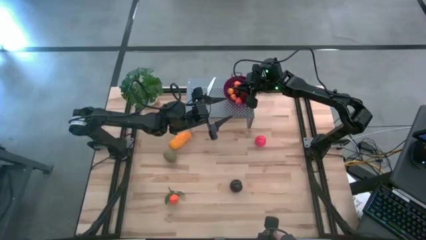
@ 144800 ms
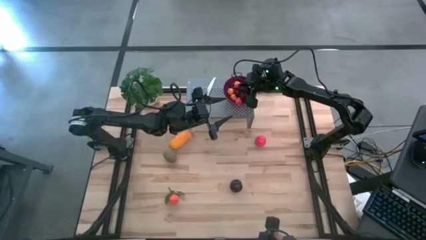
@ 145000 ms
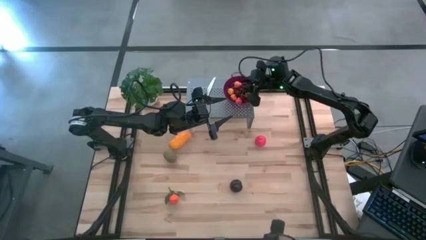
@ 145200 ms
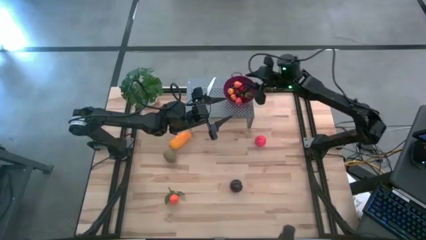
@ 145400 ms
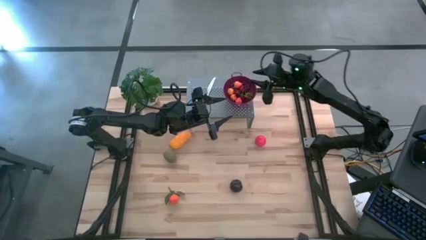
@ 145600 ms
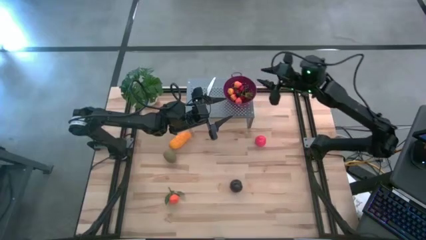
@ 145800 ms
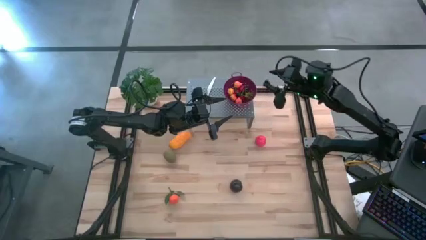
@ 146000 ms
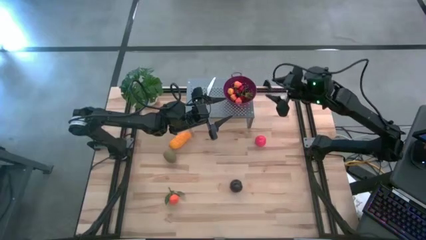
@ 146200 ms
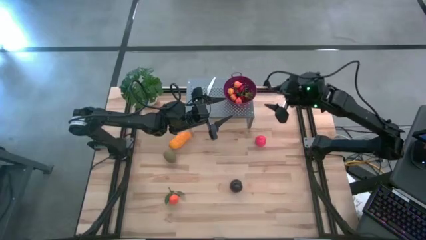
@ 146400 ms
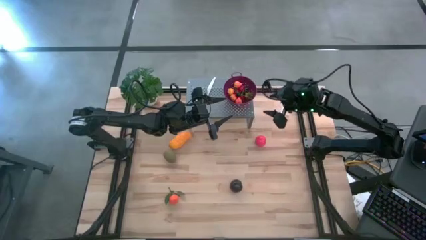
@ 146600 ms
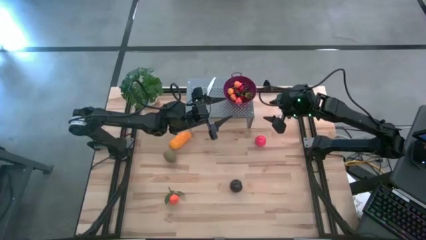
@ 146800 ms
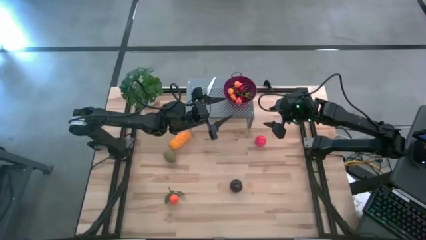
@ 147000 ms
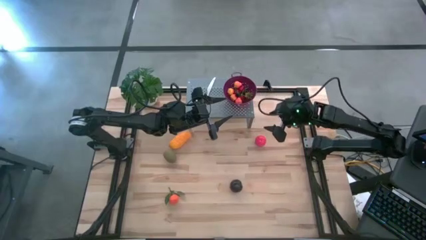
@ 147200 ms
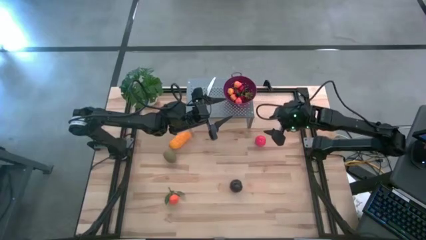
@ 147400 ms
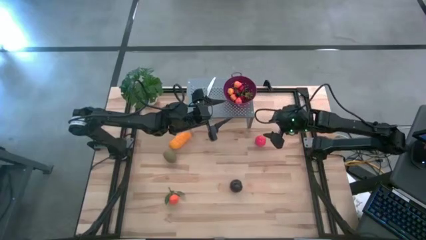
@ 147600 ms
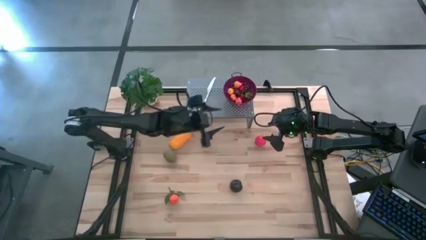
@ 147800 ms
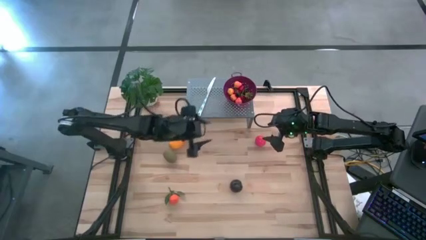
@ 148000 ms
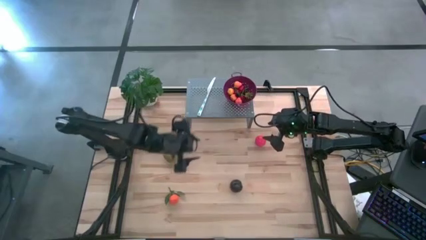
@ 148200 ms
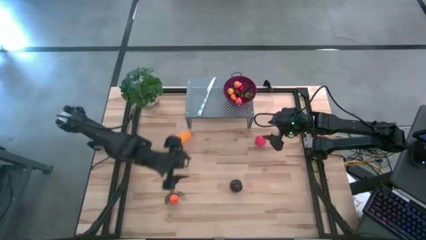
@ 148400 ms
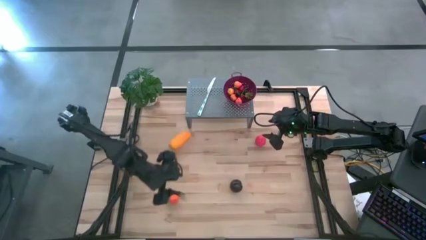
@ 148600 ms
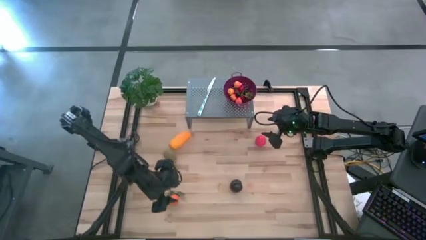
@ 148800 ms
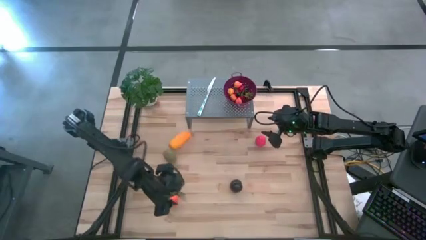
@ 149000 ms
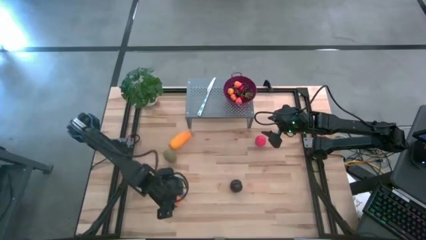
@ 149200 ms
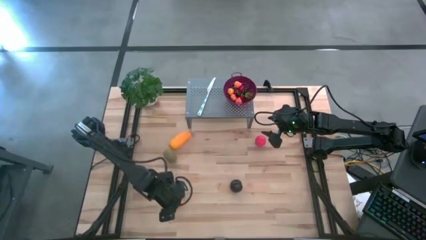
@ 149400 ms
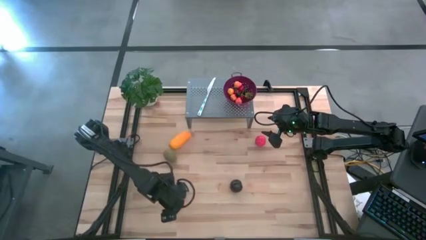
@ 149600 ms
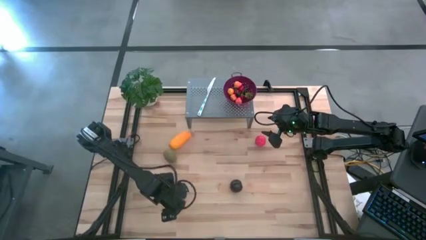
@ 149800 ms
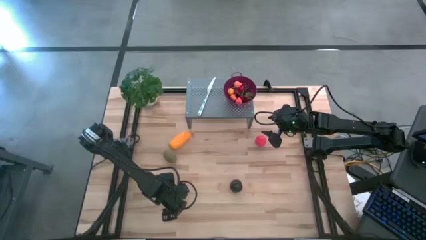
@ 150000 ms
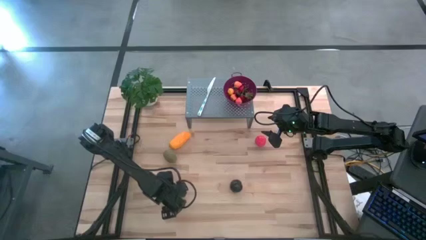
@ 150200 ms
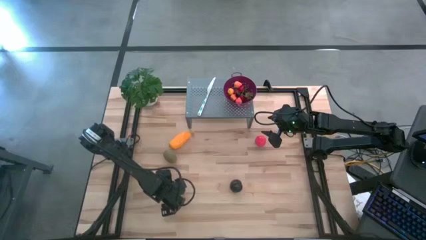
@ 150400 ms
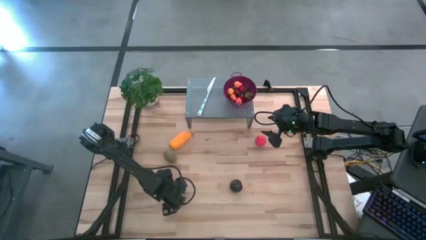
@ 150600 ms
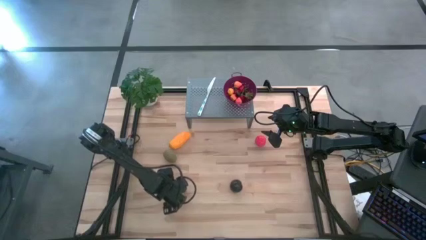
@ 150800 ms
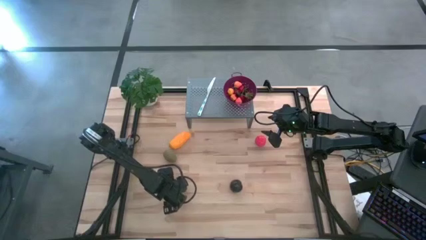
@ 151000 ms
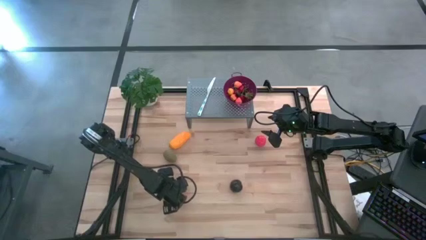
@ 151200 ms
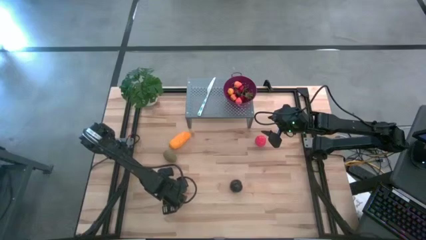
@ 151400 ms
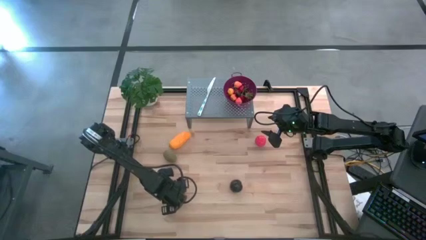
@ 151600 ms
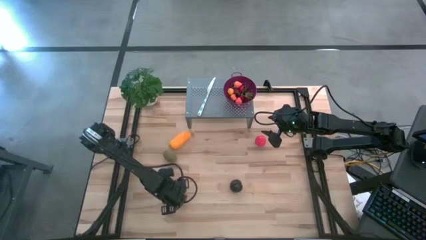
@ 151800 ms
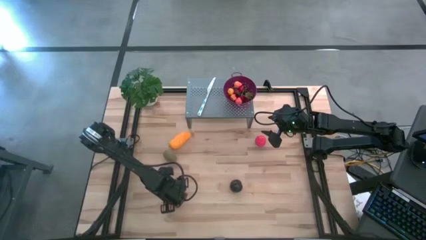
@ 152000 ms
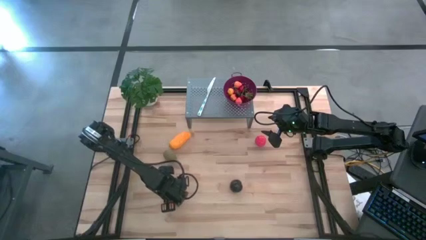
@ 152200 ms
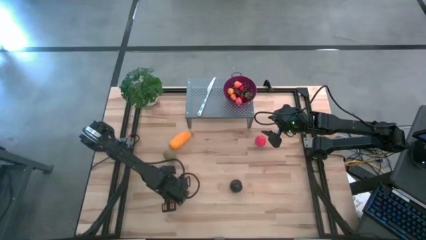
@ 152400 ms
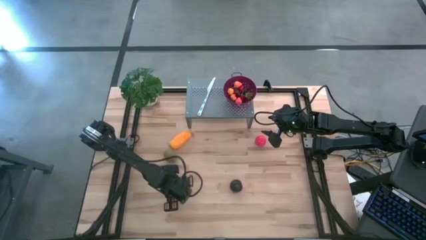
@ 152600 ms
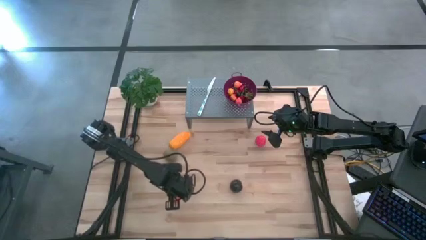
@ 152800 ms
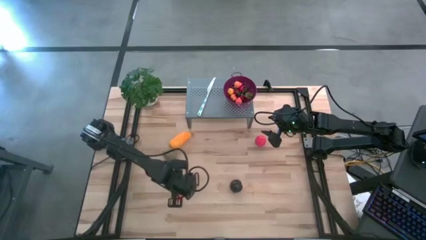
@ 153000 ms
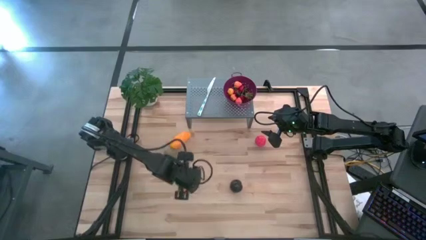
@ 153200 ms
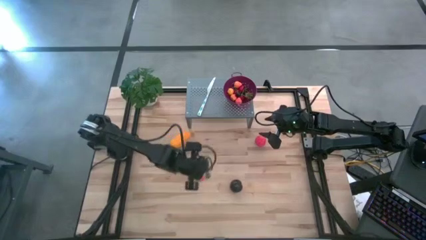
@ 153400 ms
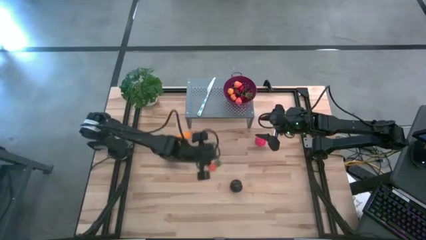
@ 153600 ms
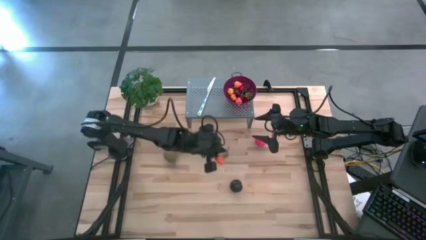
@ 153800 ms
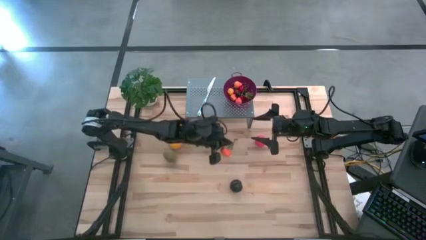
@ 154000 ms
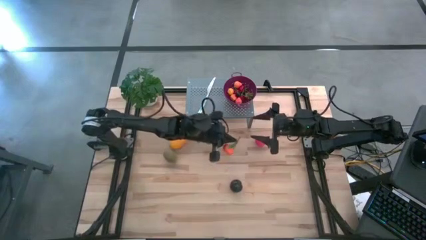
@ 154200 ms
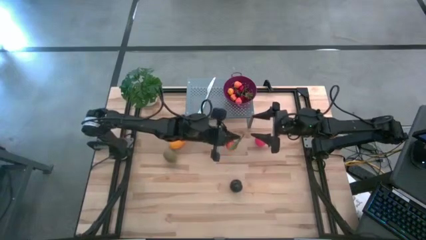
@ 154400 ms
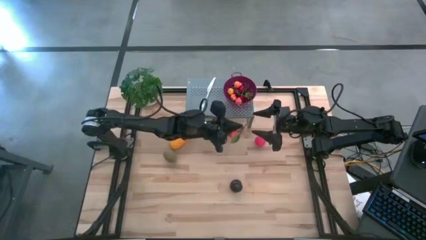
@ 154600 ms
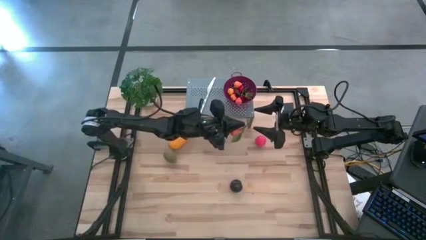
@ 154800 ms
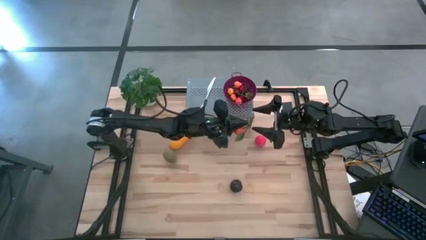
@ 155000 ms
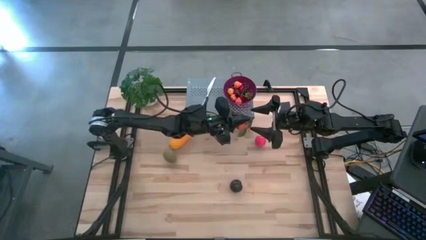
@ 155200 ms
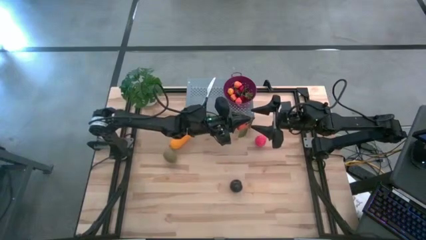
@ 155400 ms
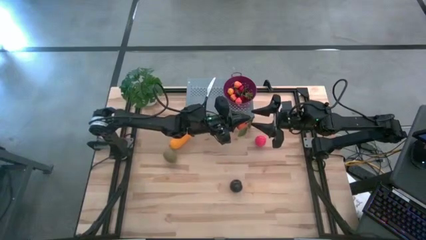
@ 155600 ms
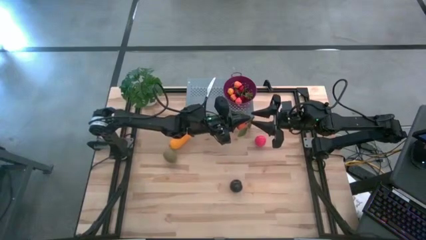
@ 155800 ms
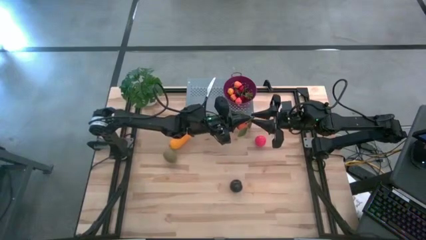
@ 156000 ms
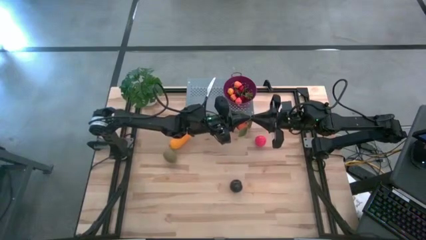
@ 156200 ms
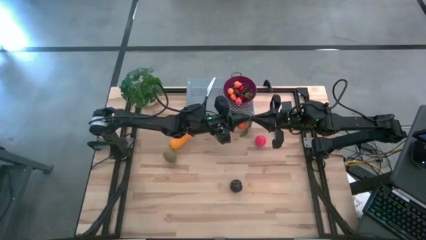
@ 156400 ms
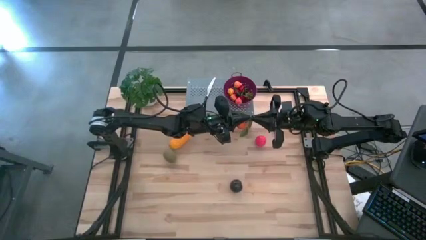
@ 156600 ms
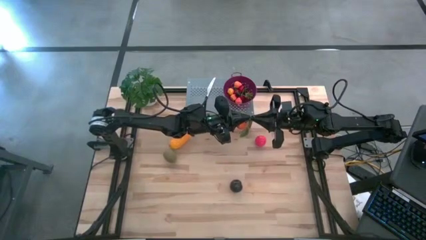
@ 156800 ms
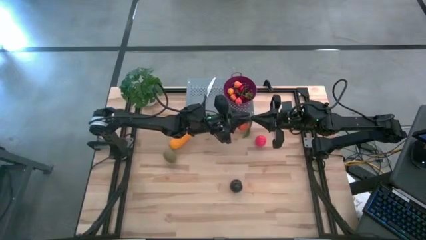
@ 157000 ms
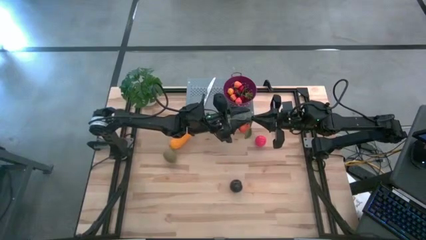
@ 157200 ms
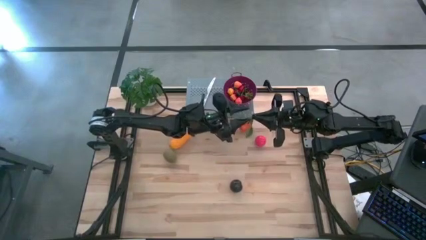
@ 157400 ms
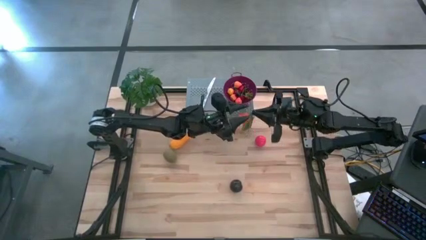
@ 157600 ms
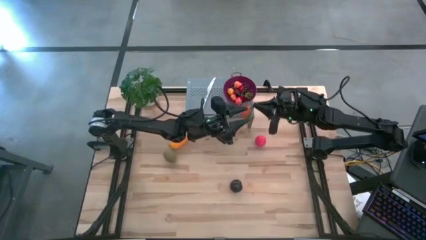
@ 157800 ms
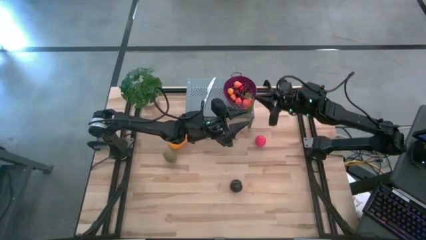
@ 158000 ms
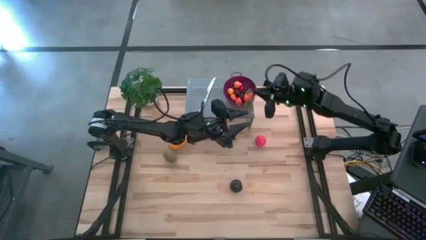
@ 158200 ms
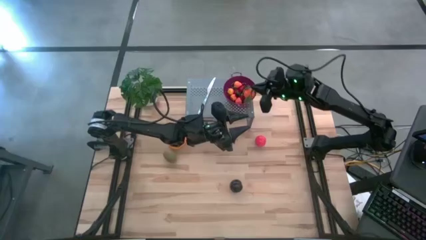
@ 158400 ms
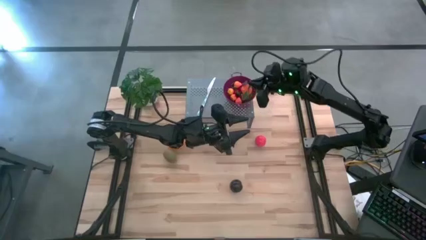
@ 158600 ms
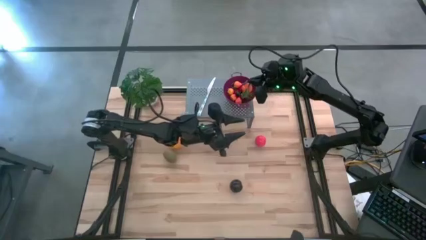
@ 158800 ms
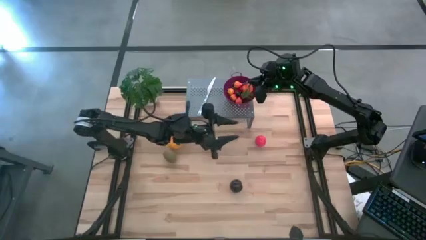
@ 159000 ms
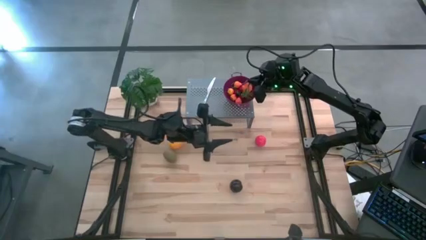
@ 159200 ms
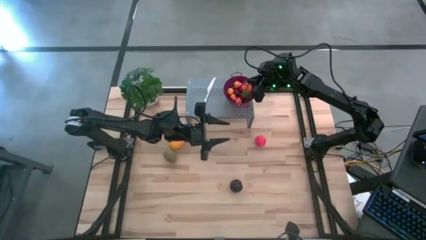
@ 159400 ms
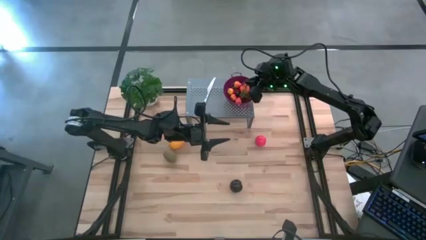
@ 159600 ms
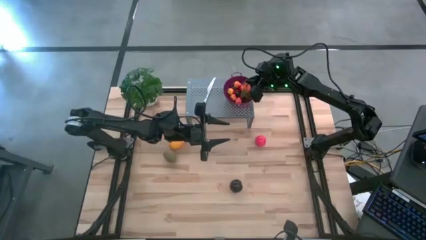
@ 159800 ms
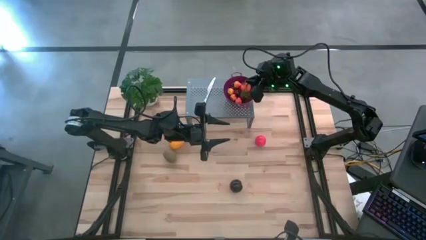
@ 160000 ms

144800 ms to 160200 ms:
Task: Pick & Place Fruit
Put the orange into the violet strainer bowl on the shelf
